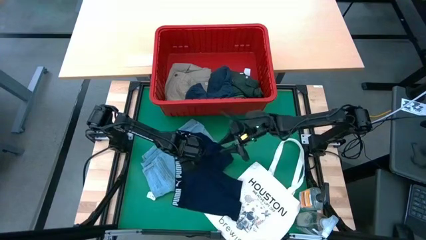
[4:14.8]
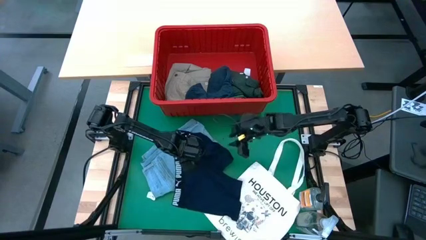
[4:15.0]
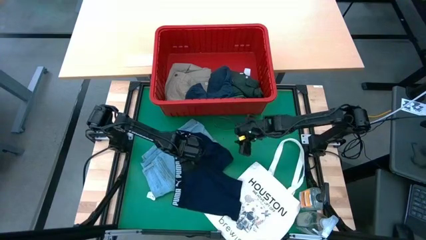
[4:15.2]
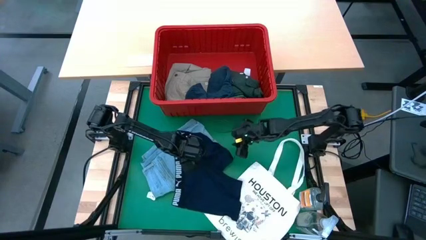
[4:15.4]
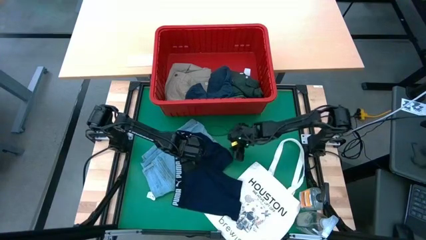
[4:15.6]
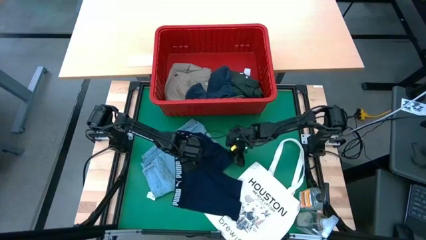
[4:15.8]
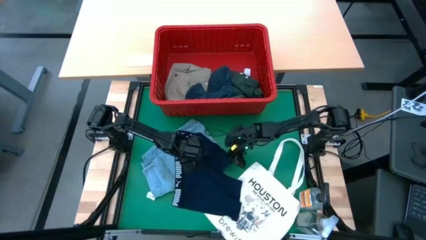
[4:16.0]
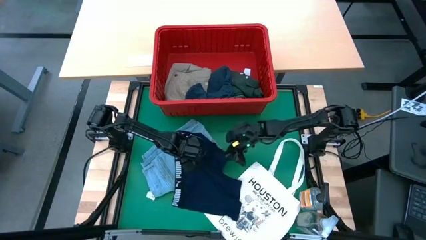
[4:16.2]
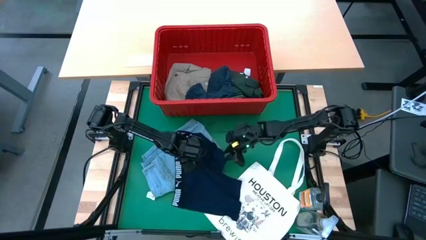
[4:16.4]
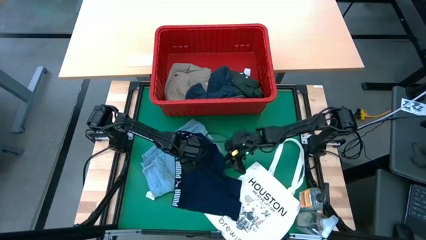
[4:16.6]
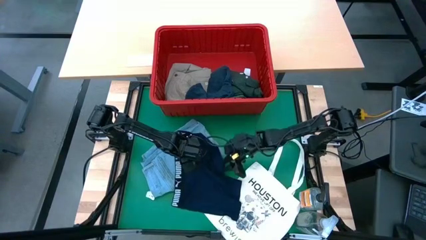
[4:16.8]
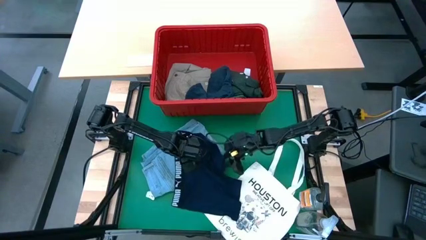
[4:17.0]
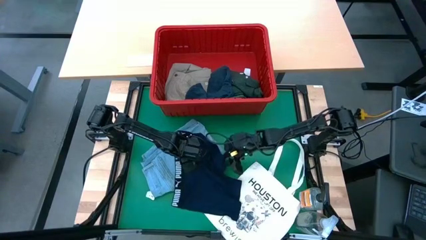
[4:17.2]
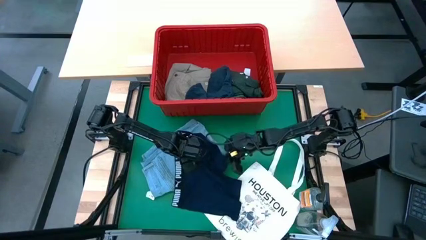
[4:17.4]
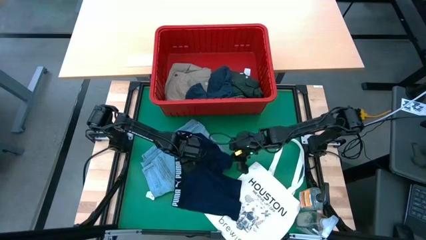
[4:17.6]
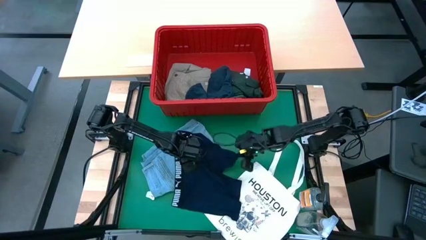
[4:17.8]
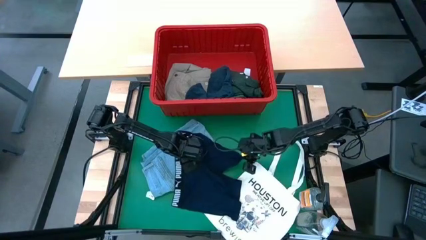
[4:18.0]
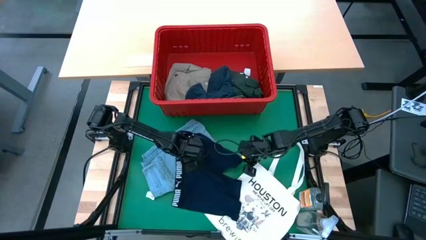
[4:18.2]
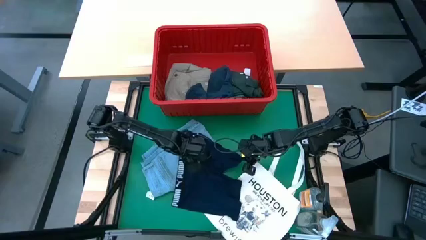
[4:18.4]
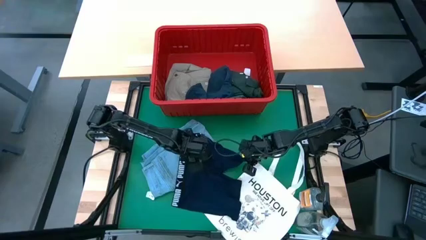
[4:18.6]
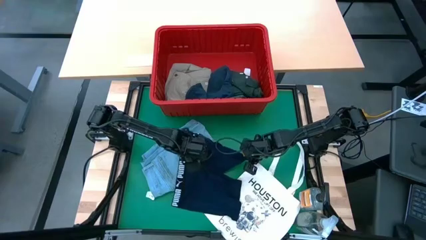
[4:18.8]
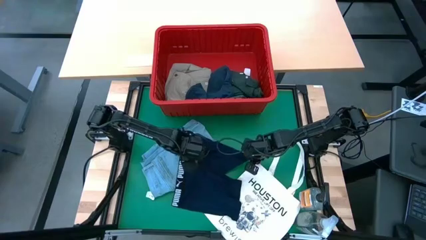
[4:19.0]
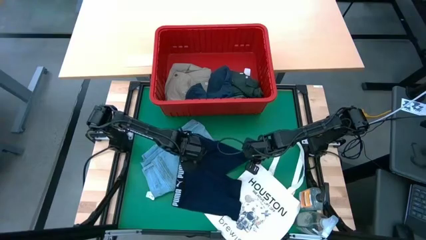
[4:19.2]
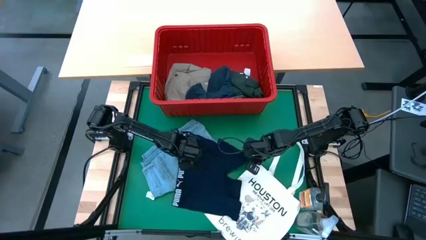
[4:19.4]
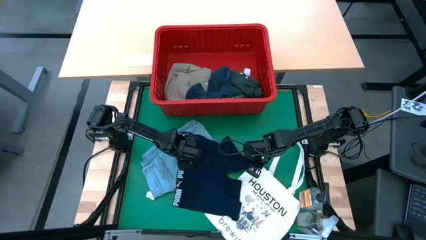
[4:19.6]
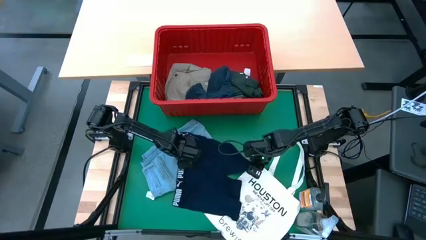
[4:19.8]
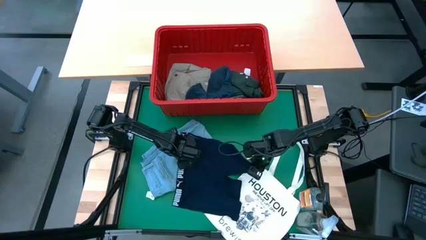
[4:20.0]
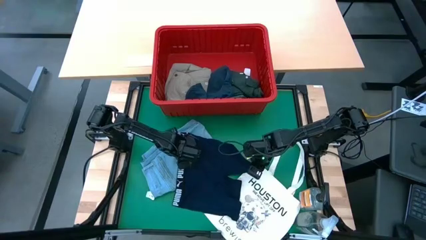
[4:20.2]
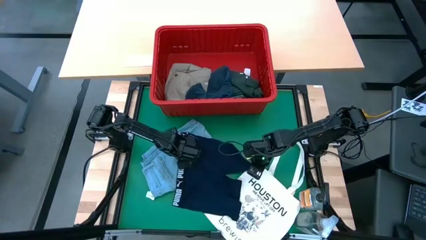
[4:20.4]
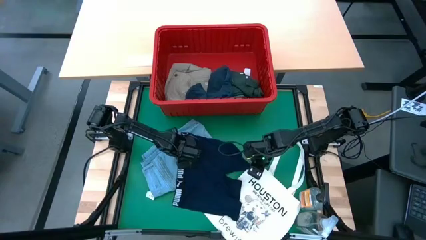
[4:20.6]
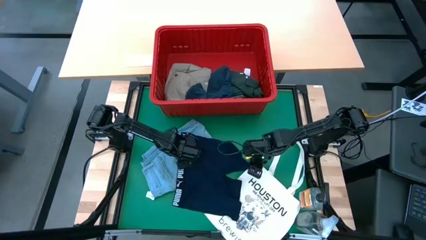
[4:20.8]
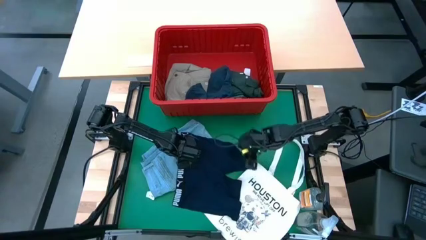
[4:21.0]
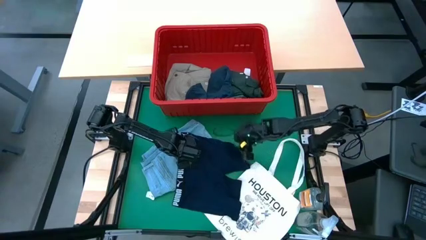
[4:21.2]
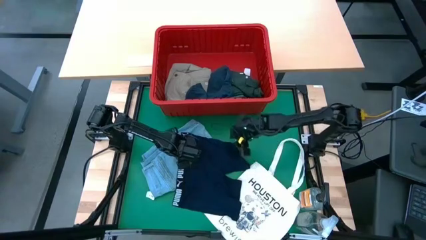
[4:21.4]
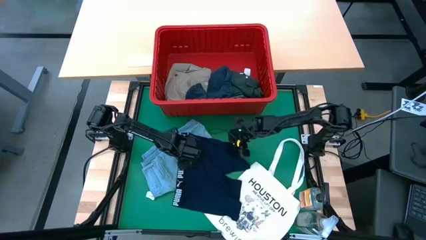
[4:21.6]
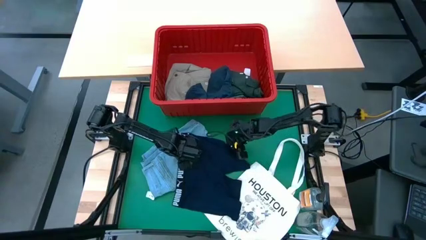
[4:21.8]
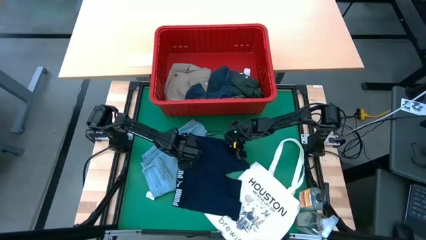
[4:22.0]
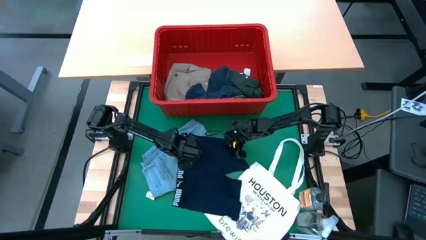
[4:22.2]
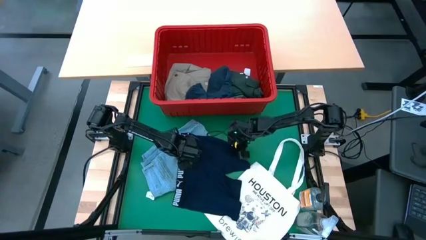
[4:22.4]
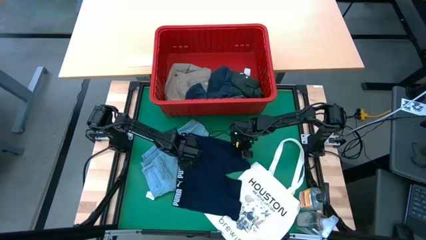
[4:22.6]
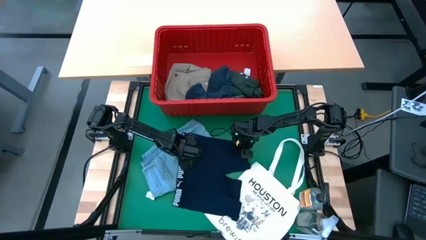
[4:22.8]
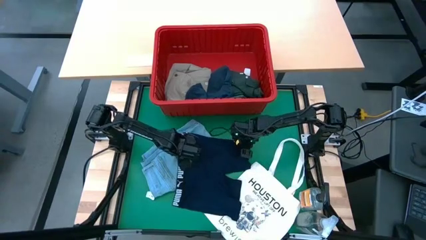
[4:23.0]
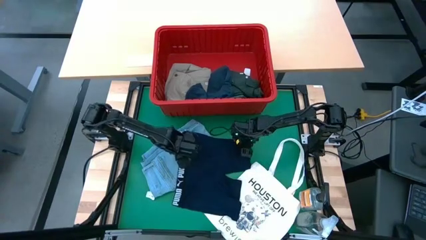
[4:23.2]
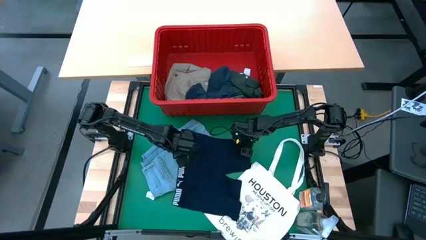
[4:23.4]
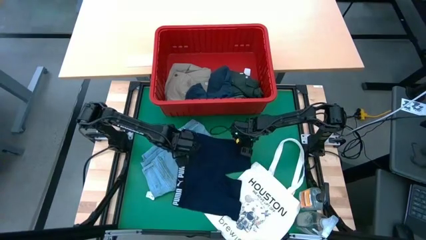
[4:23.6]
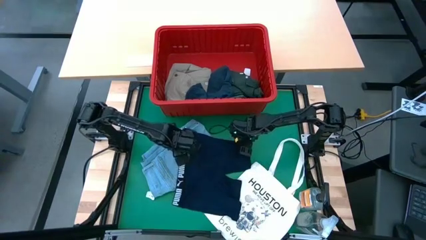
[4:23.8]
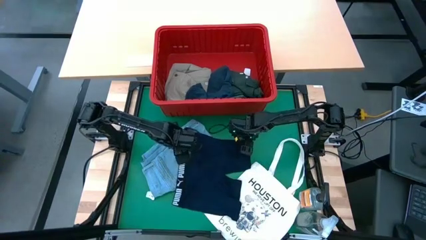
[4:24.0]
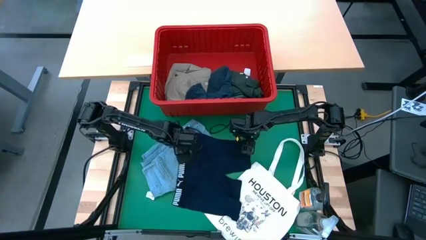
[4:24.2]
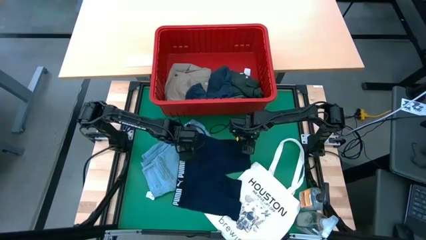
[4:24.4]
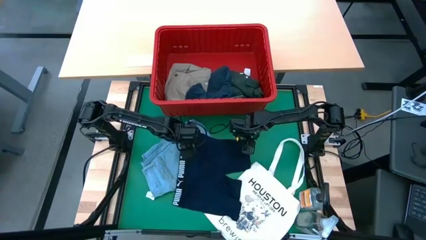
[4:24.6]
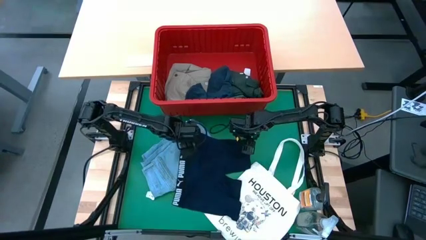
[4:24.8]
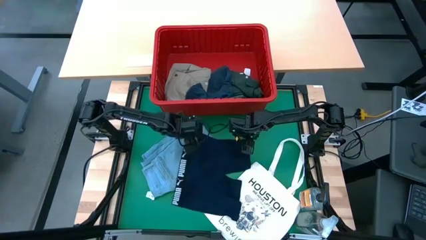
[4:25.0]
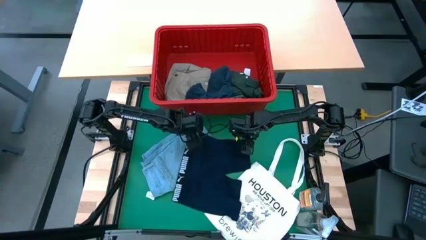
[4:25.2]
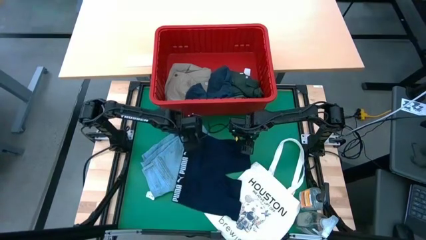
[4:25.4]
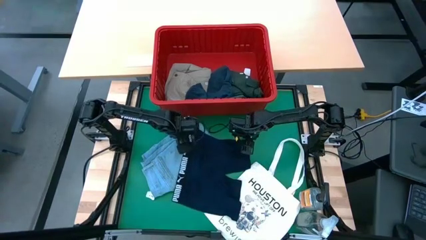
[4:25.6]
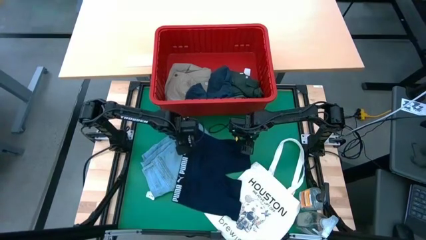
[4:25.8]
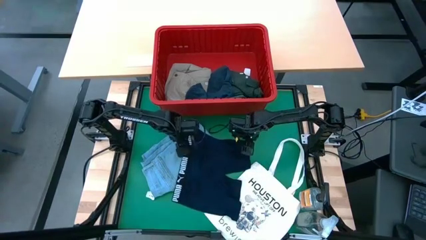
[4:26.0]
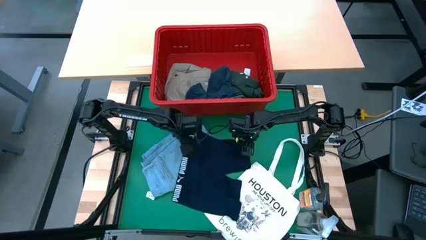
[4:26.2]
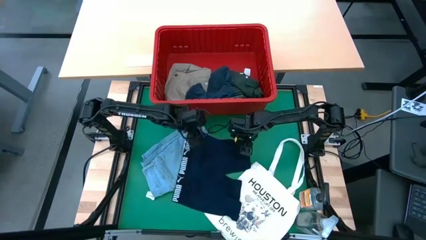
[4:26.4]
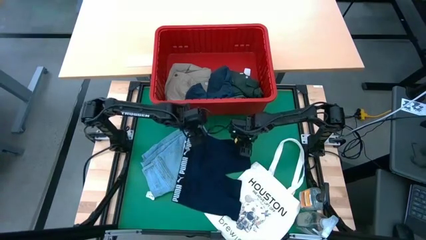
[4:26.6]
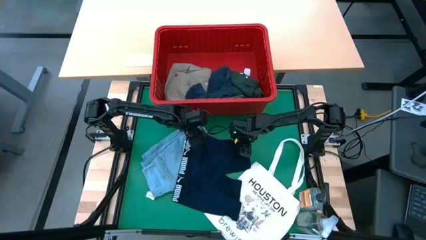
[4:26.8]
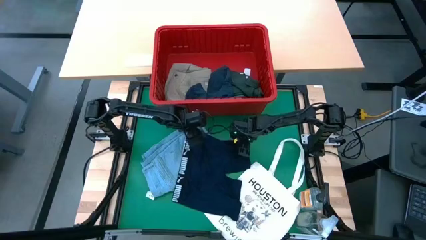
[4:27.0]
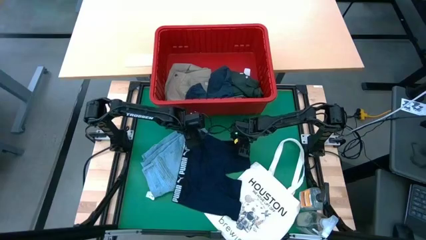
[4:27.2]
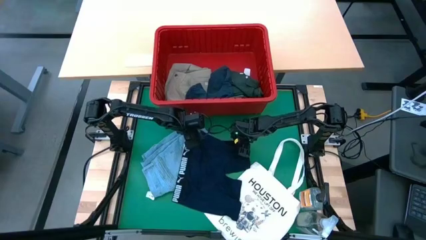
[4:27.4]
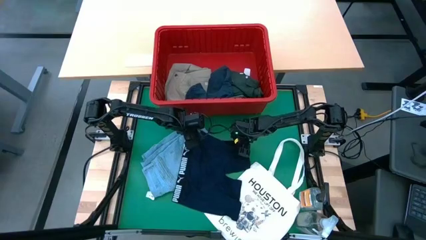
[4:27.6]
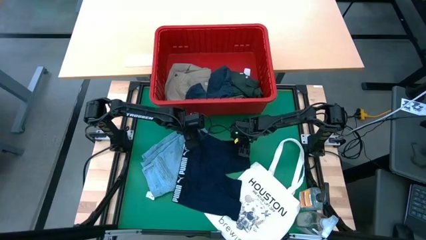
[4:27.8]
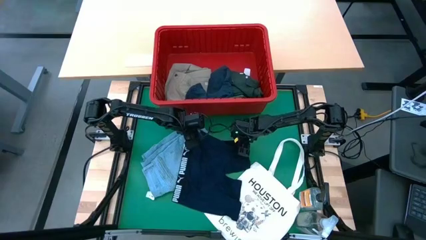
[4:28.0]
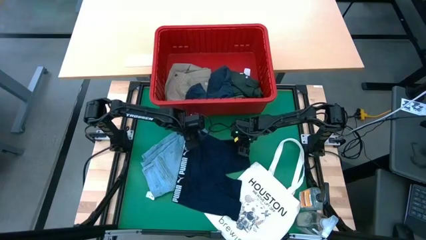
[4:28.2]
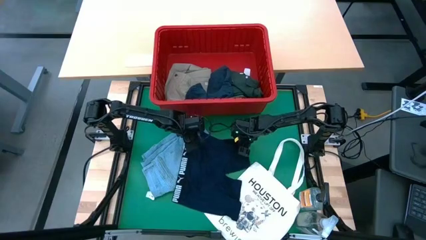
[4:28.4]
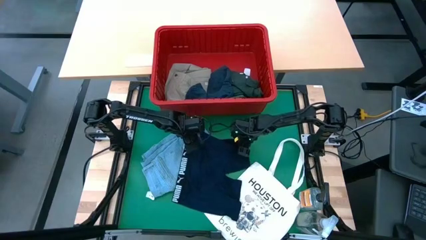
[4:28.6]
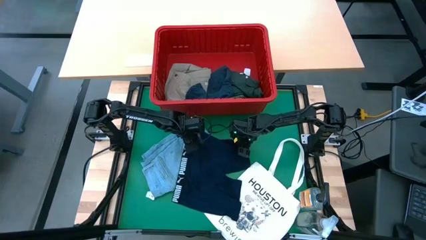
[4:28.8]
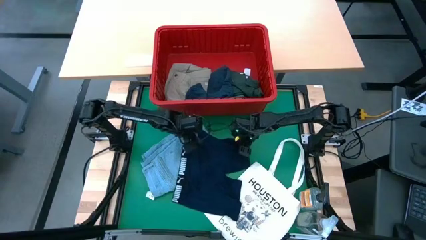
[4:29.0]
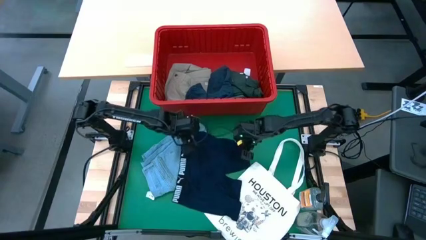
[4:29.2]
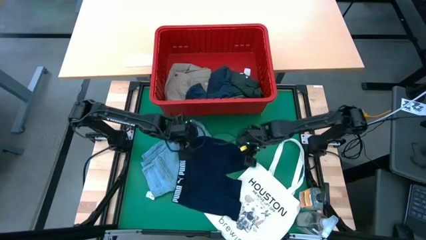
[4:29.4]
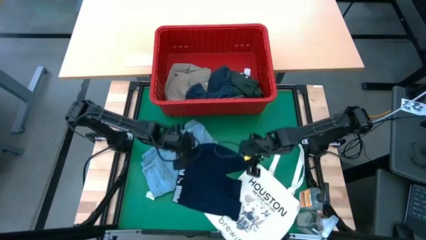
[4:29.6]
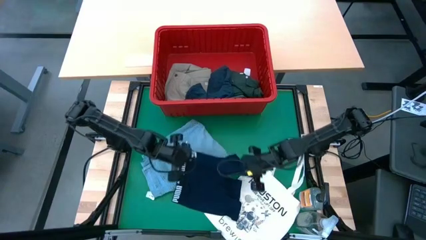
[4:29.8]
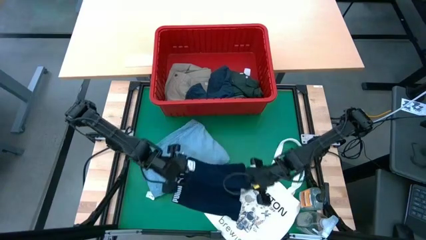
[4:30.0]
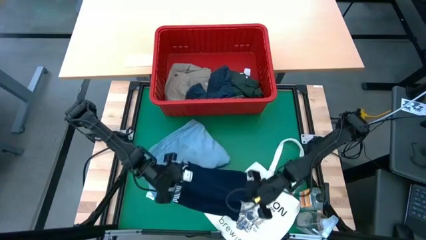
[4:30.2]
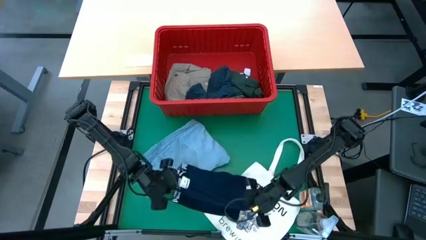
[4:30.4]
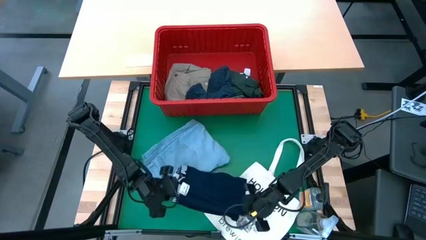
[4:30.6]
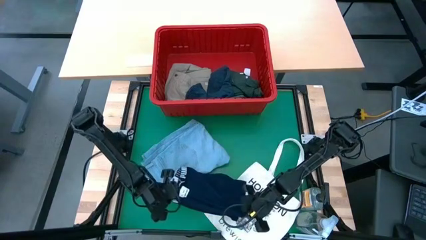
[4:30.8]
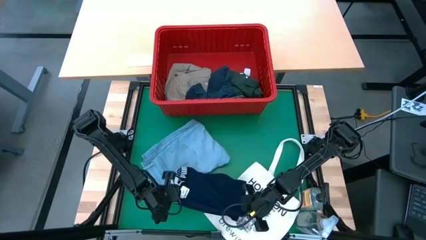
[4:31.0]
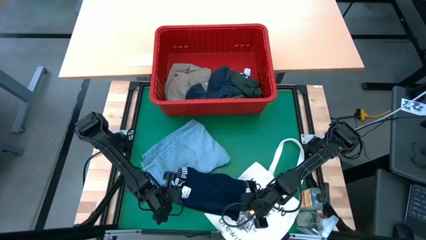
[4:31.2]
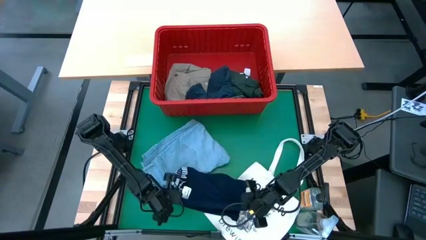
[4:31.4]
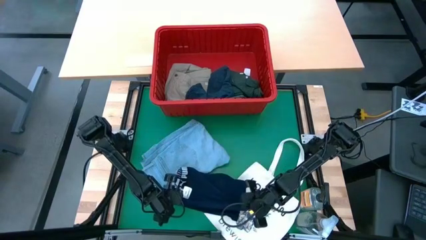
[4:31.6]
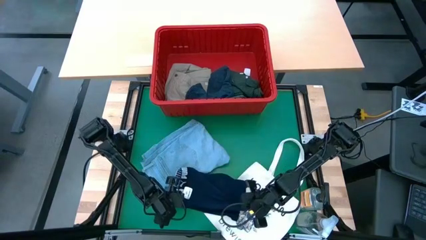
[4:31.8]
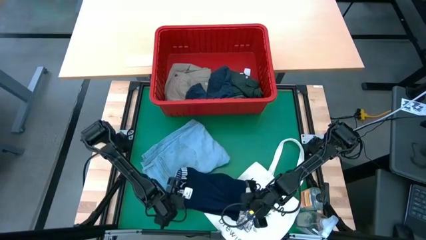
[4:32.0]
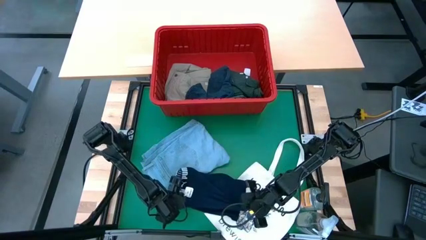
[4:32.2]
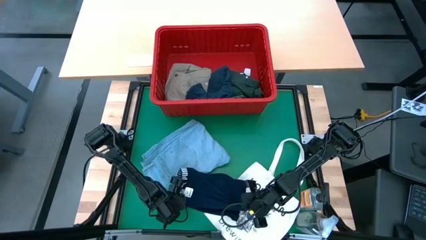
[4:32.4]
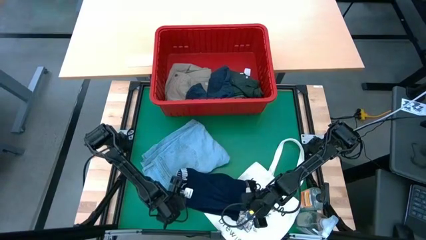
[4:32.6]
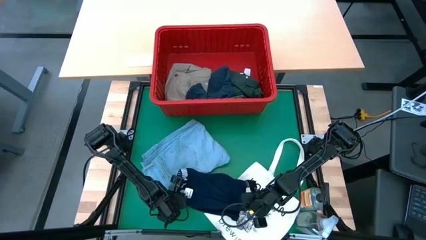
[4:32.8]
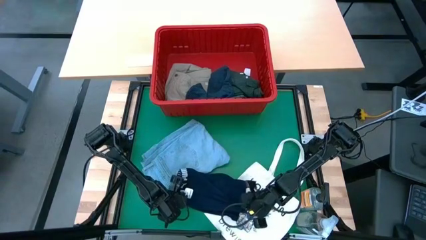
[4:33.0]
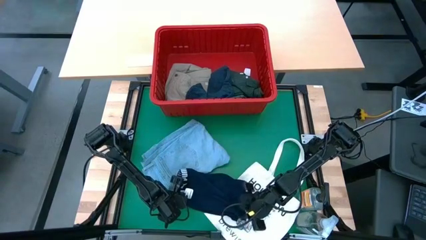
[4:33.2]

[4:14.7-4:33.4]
Task: Fold Laundry from Bin
Fold the dark blue boxer shorts
